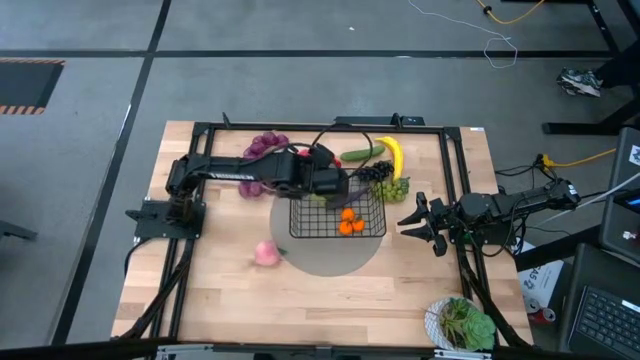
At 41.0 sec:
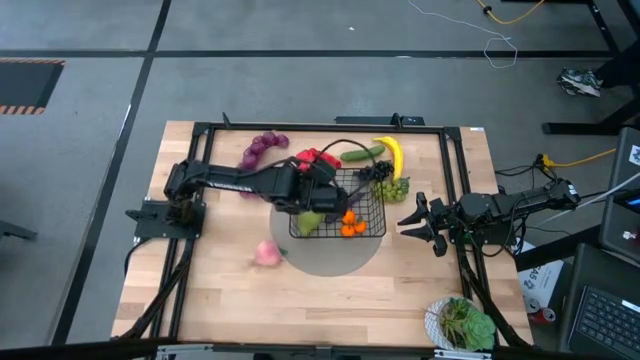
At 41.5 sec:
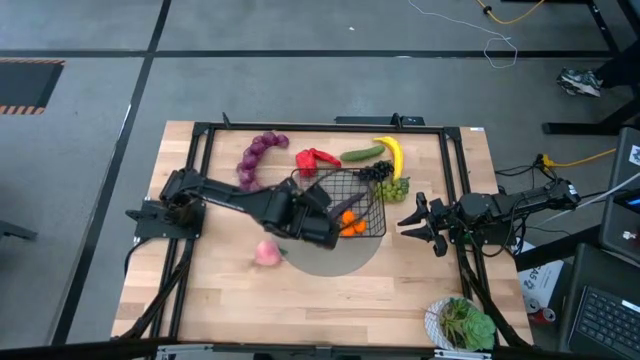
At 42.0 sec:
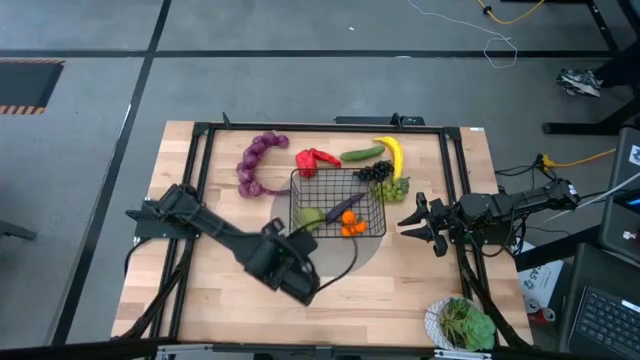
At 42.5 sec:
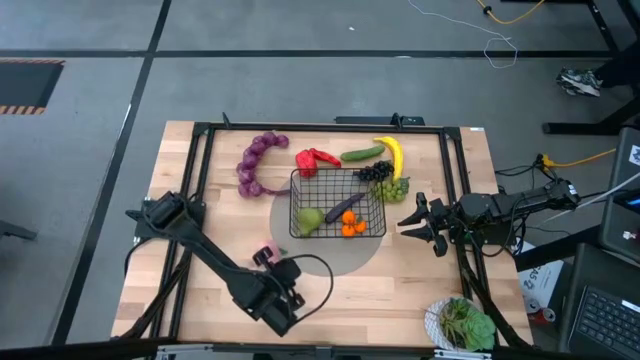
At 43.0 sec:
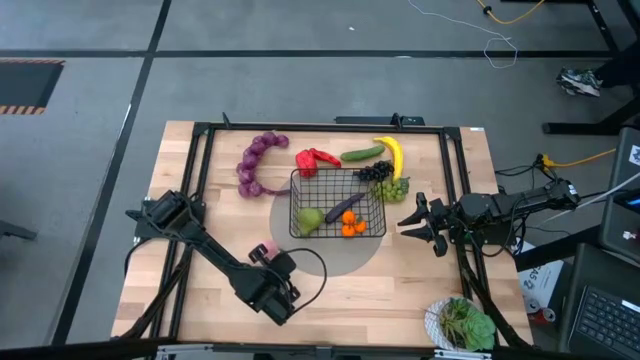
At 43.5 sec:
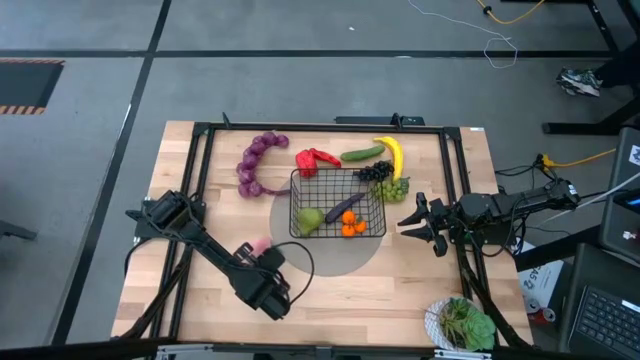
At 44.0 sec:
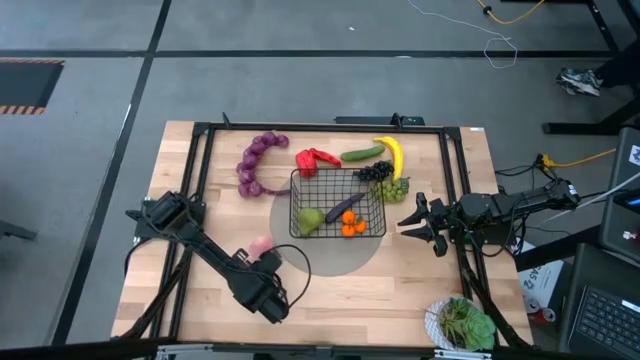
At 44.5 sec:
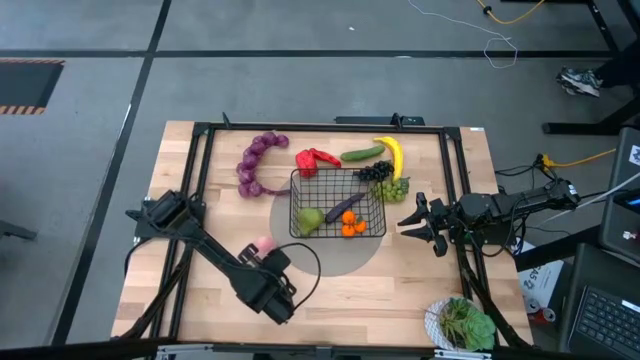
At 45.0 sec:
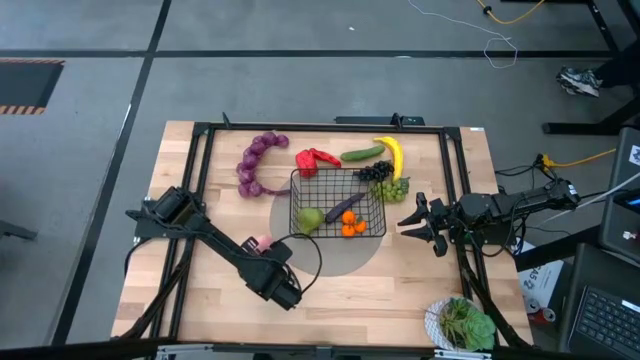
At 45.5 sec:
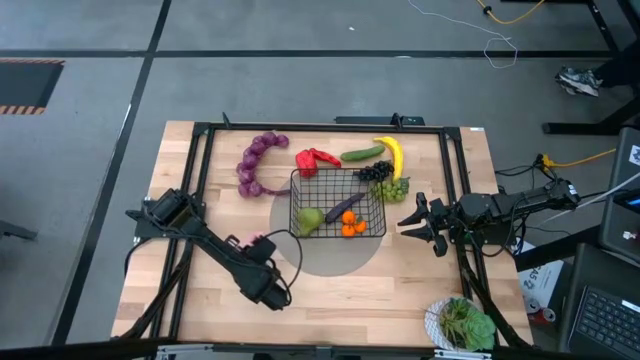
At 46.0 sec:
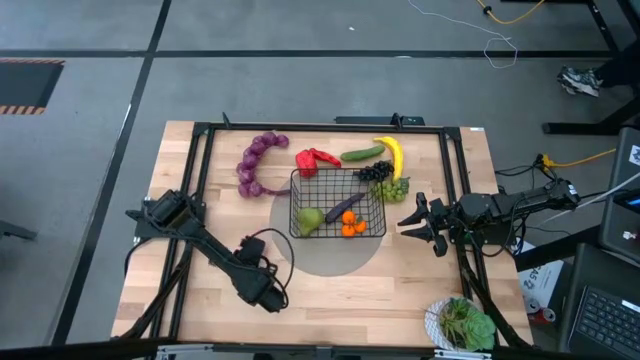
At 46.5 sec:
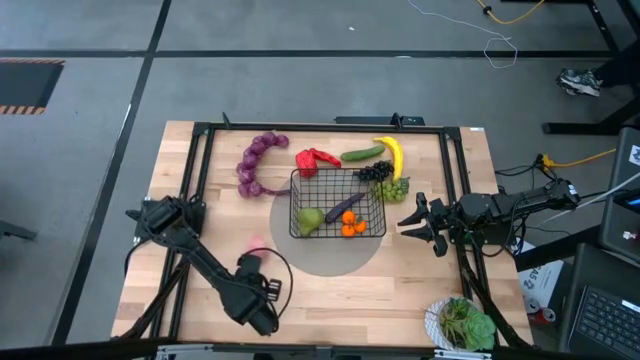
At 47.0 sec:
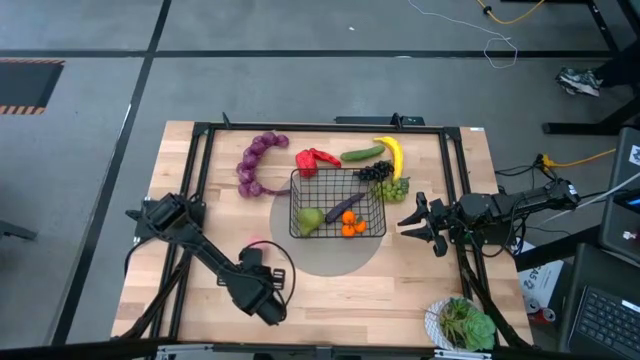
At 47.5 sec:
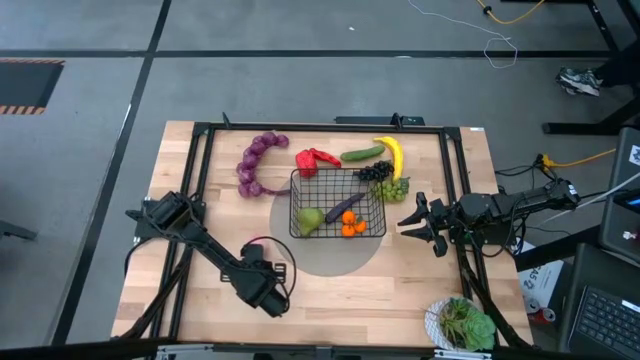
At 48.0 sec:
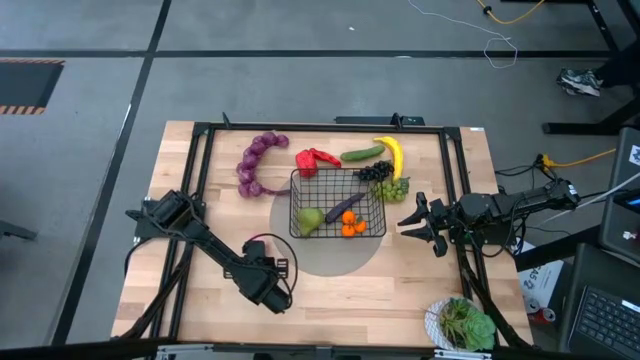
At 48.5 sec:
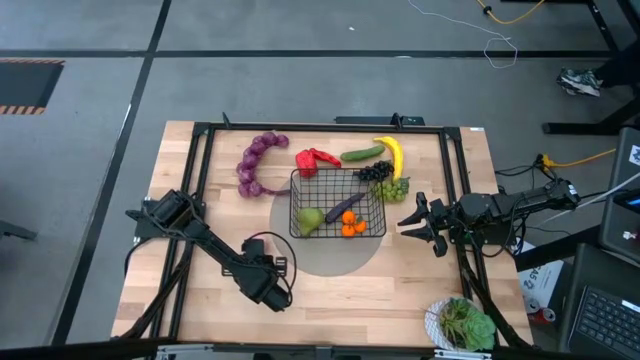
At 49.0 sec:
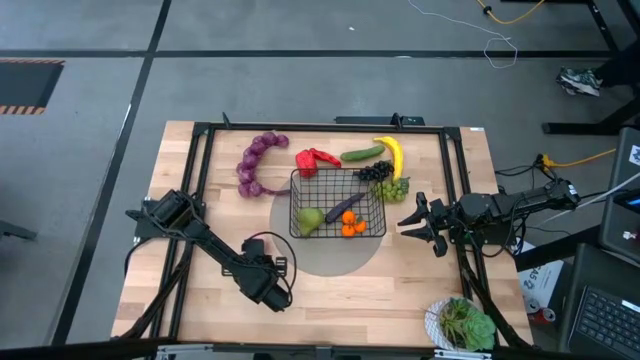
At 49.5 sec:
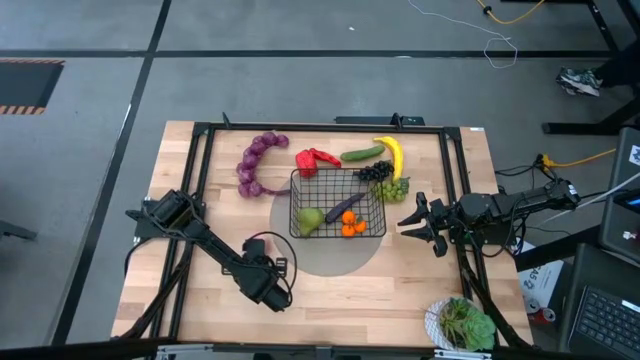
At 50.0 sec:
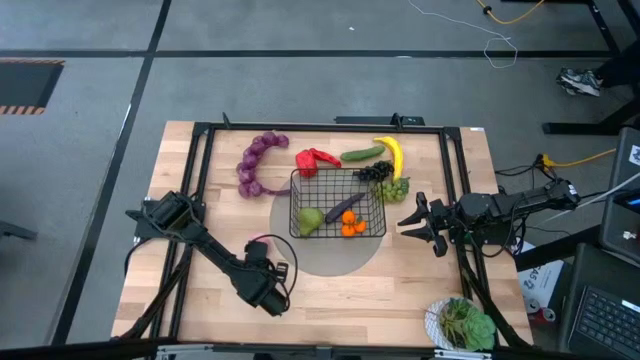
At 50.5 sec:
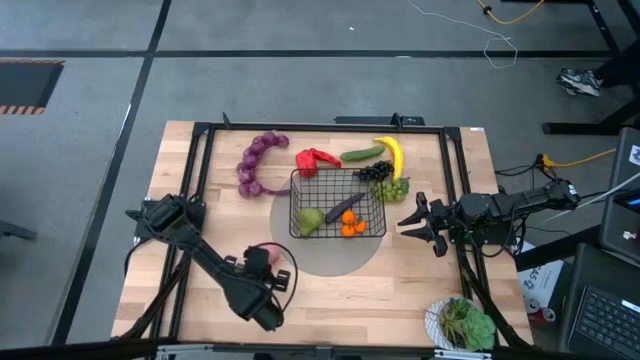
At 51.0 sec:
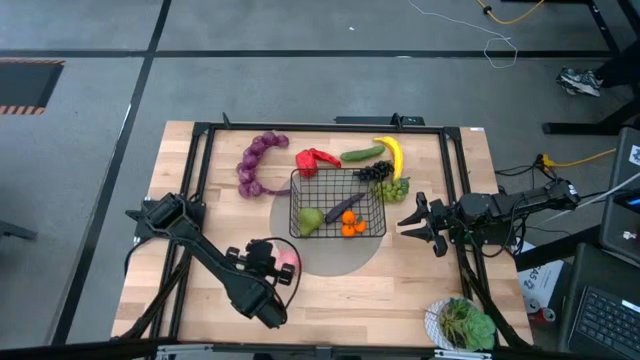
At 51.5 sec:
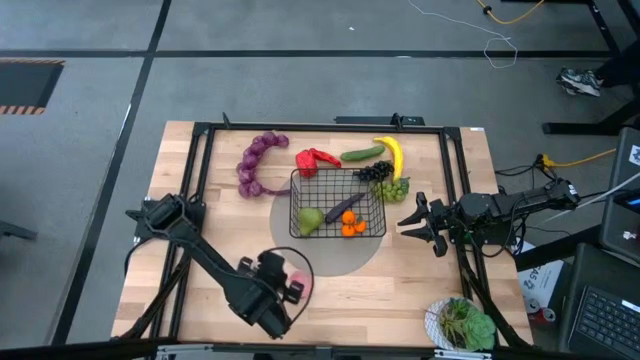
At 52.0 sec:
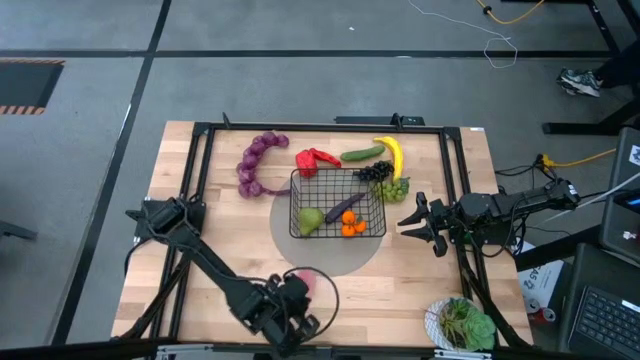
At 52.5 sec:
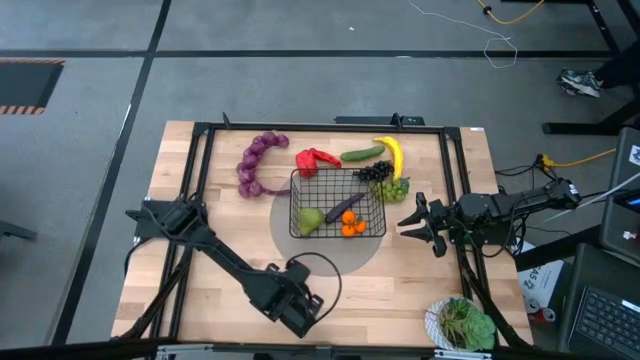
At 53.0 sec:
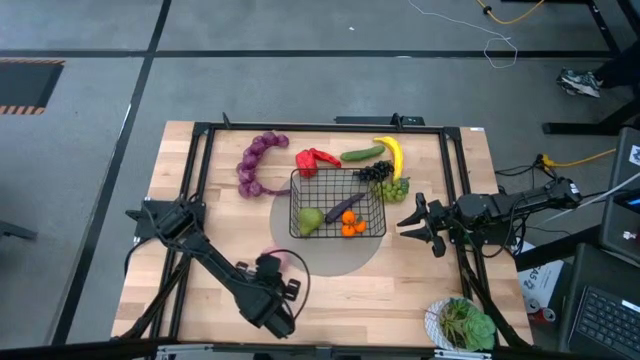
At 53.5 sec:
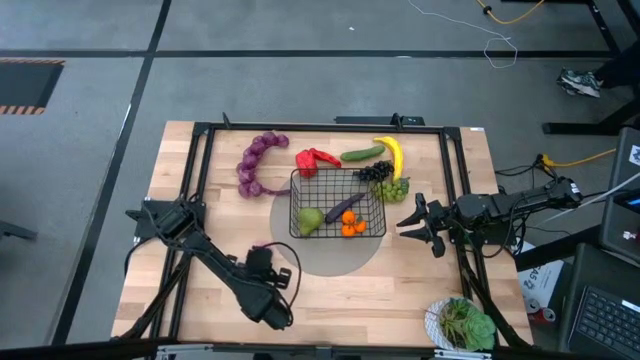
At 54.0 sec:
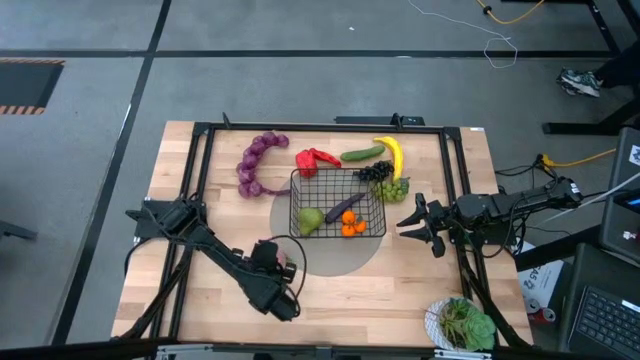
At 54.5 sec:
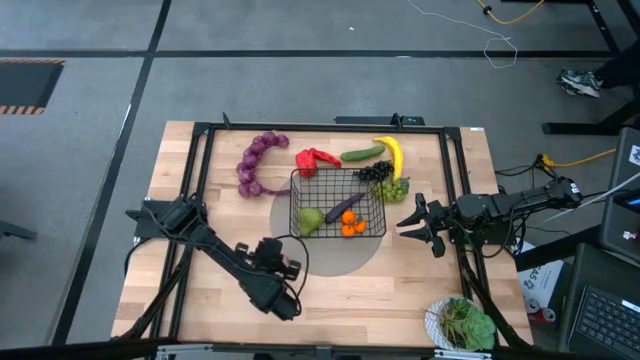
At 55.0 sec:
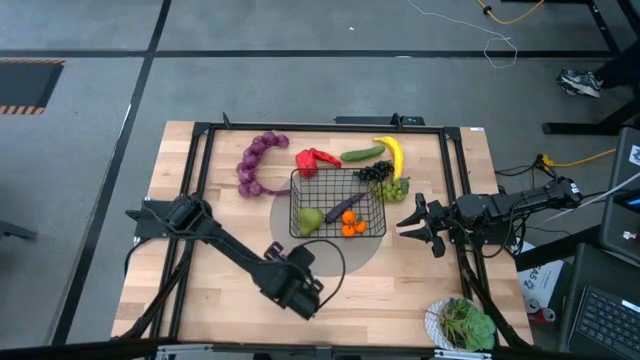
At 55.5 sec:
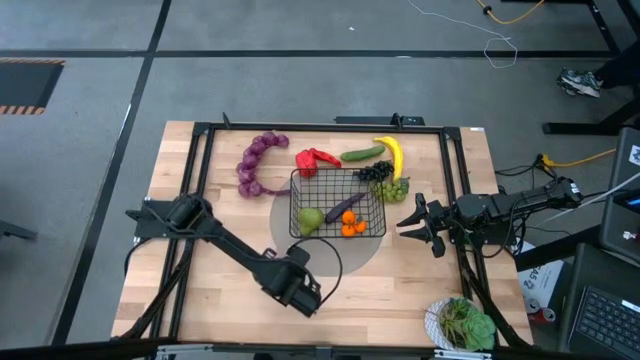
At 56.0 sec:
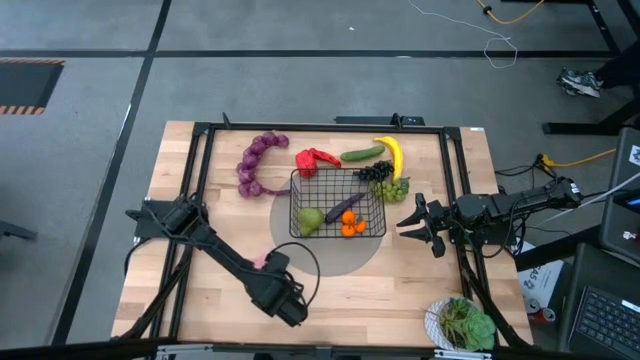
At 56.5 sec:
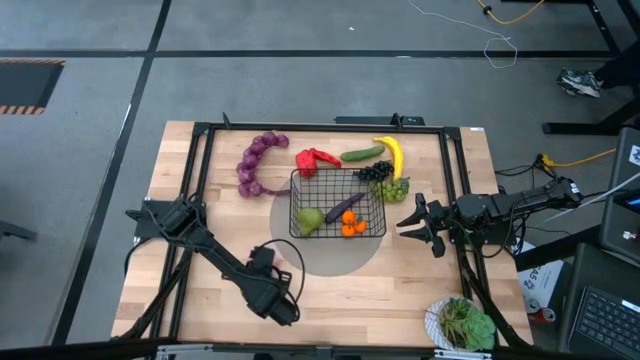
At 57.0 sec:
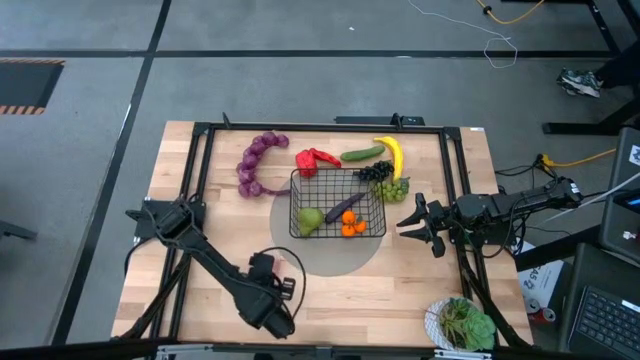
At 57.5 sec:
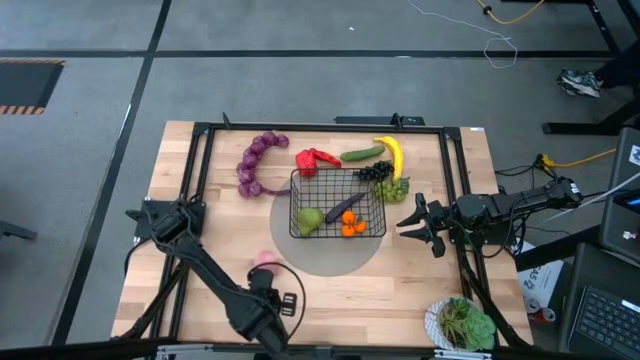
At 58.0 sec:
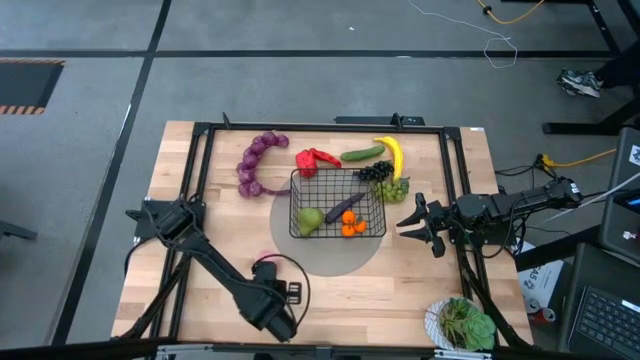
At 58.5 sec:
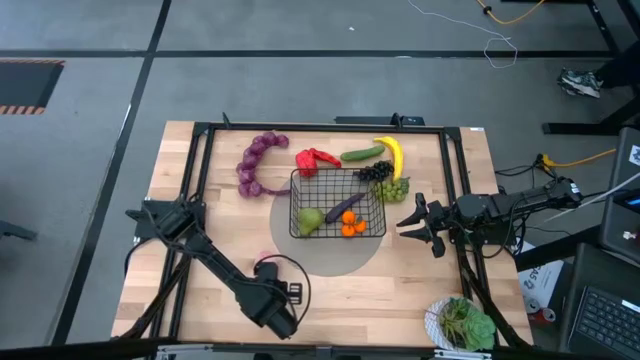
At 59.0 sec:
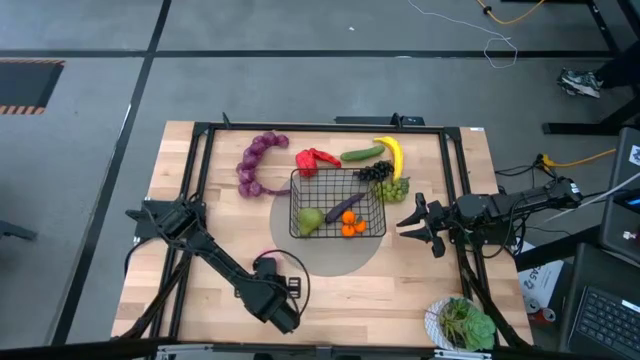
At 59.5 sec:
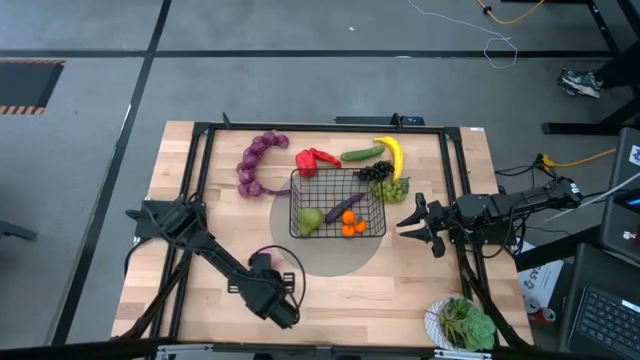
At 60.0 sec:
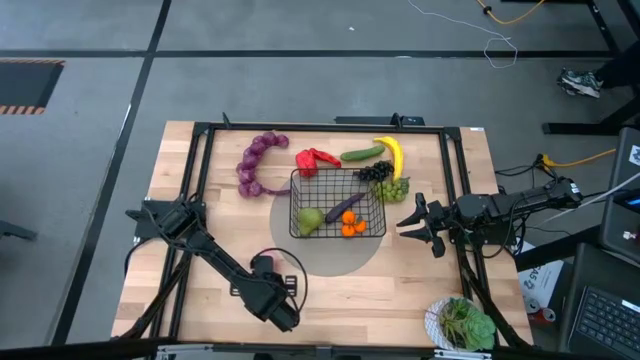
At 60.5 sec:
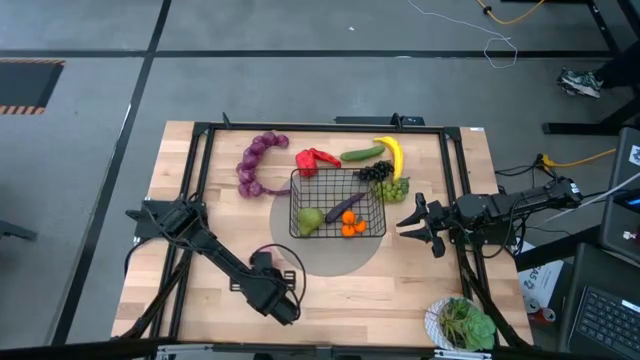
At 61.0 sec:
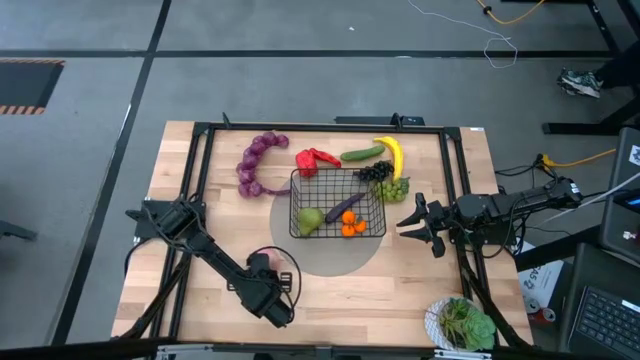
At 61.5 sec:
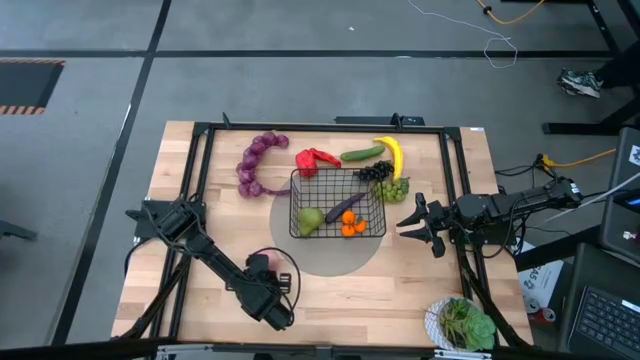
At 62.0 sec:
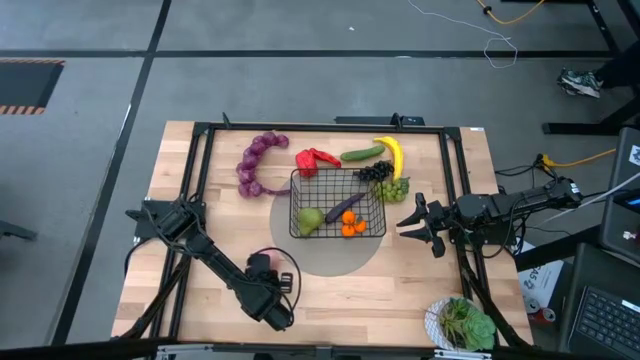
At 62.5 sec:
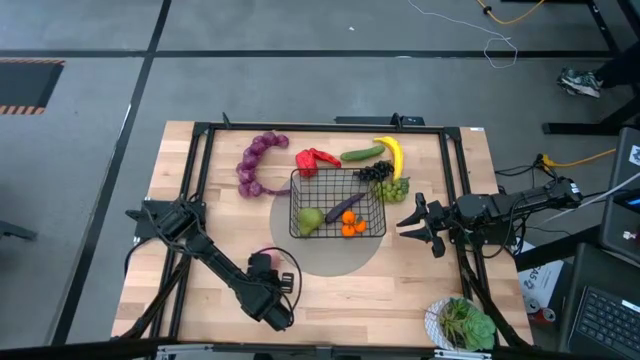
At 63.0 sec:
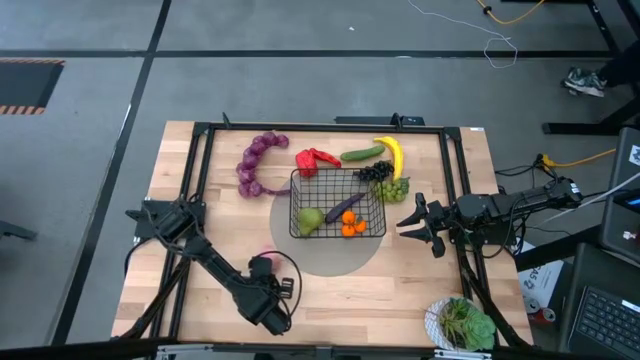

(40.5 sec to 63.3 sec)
Task: Build produce basket
Put the apricot into the wire basket
